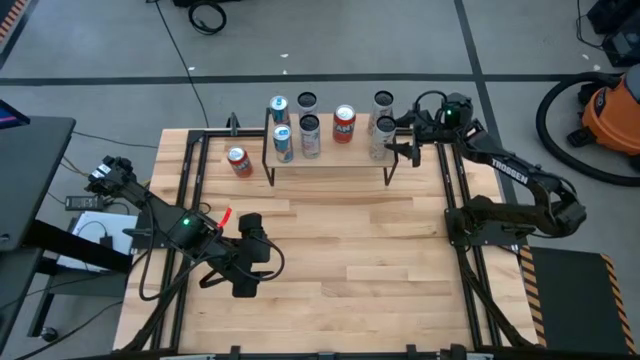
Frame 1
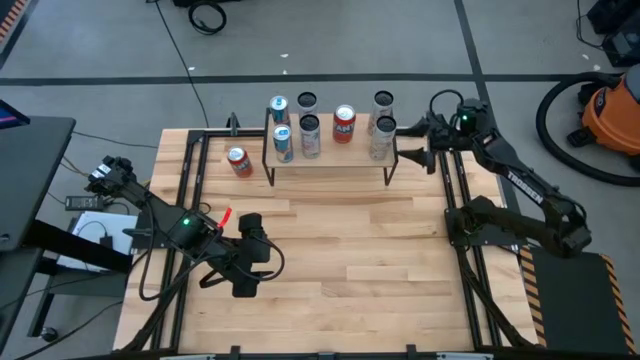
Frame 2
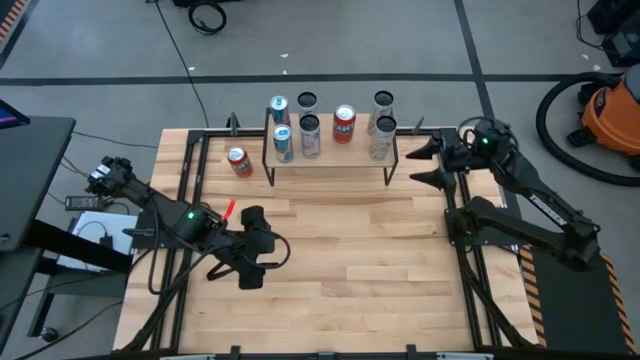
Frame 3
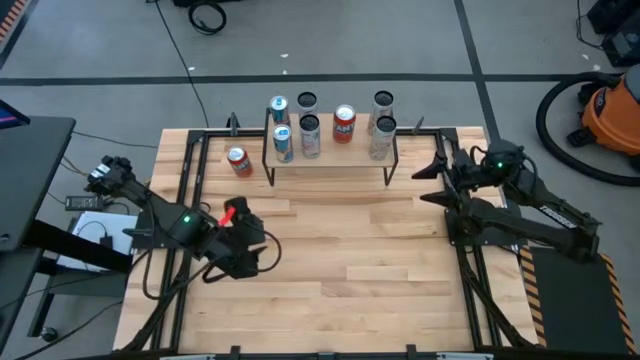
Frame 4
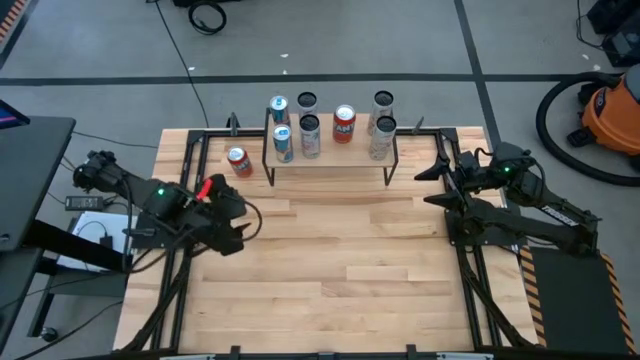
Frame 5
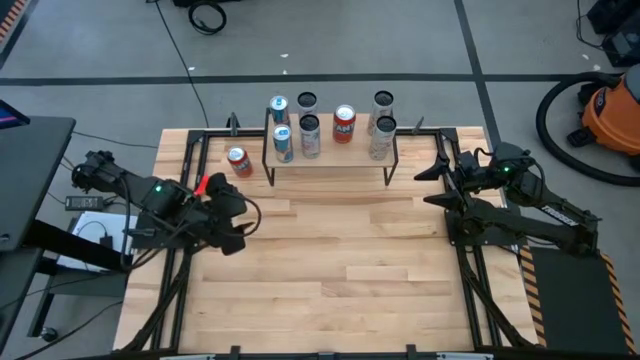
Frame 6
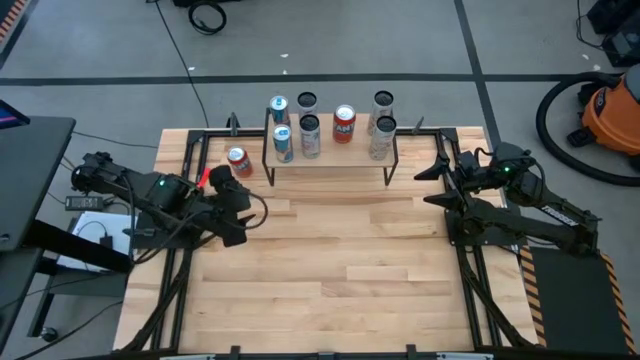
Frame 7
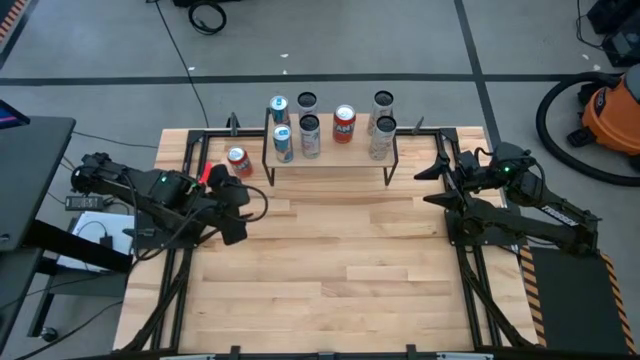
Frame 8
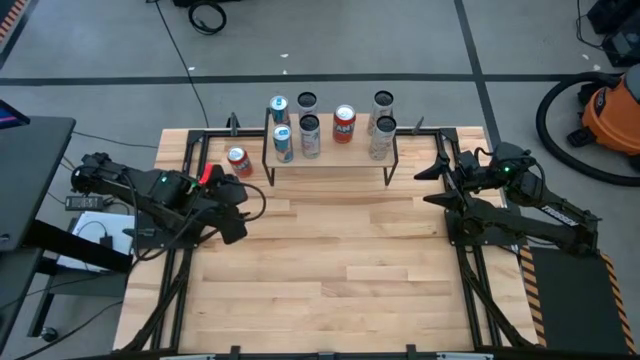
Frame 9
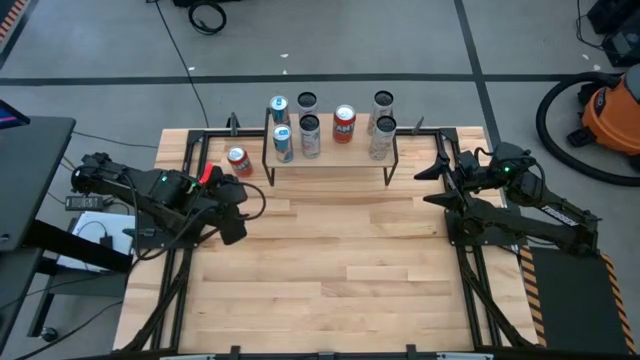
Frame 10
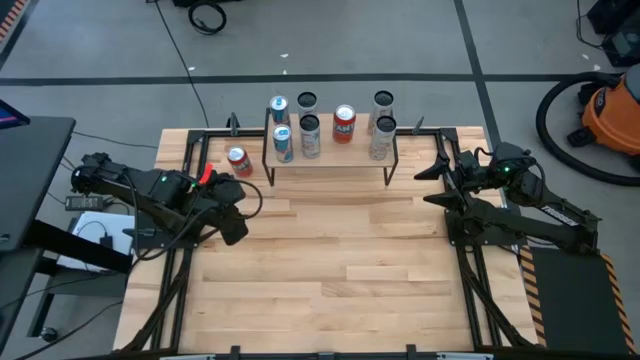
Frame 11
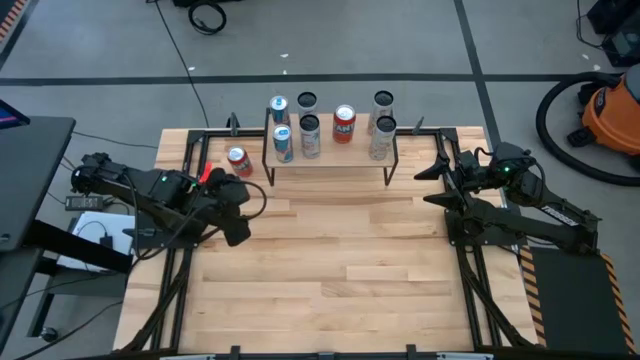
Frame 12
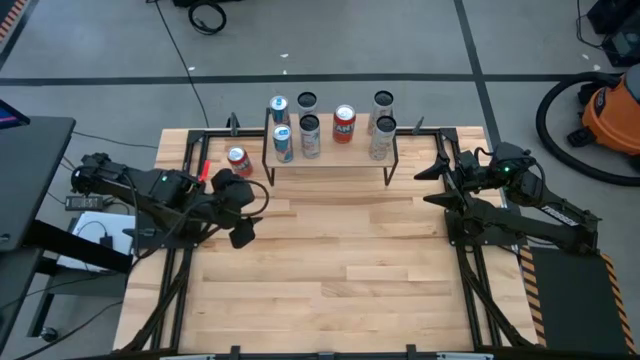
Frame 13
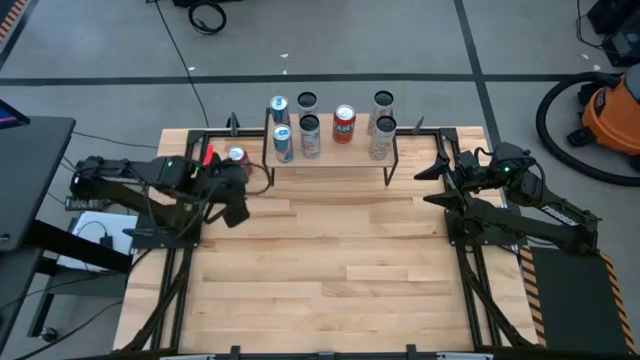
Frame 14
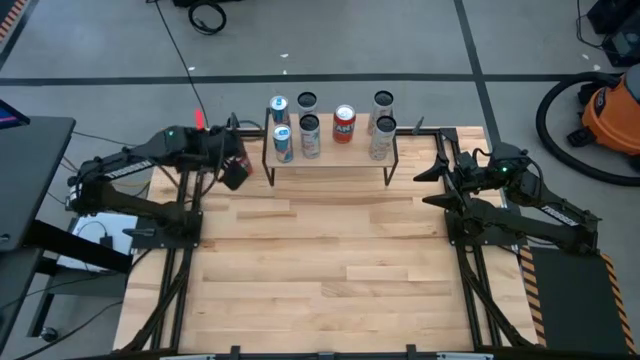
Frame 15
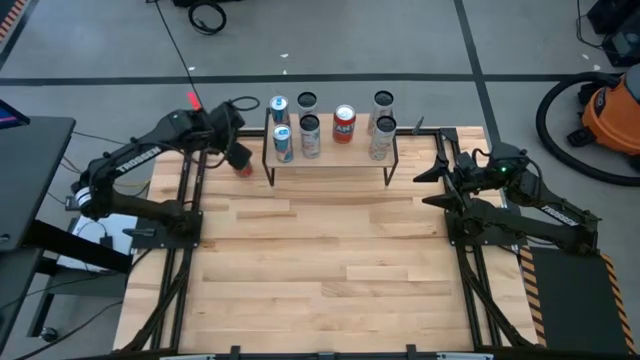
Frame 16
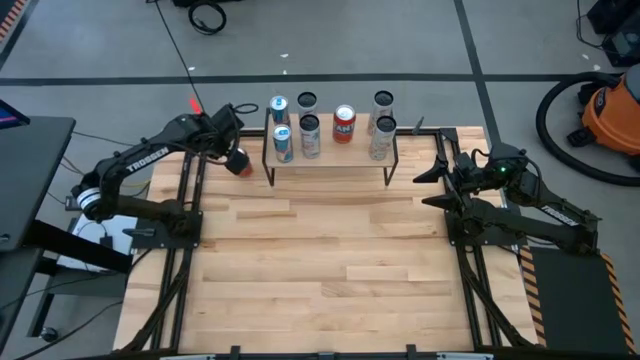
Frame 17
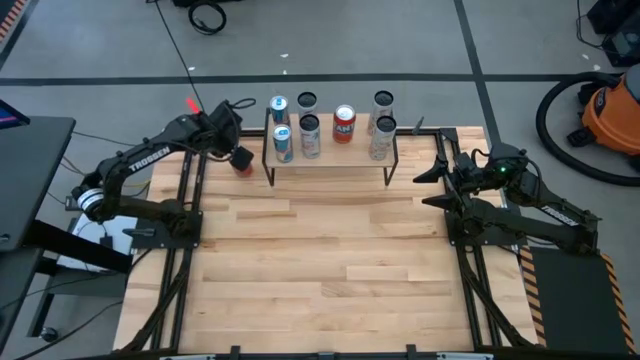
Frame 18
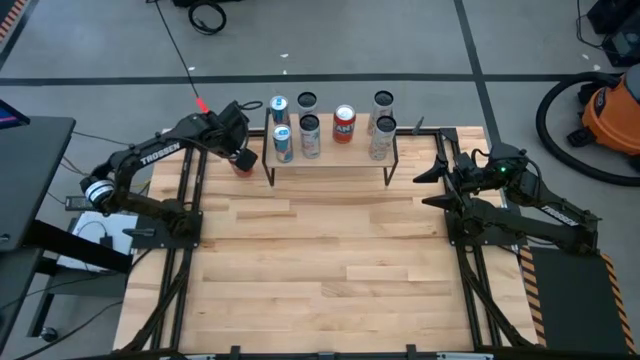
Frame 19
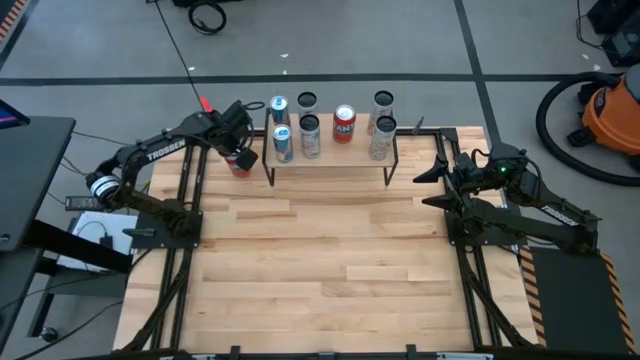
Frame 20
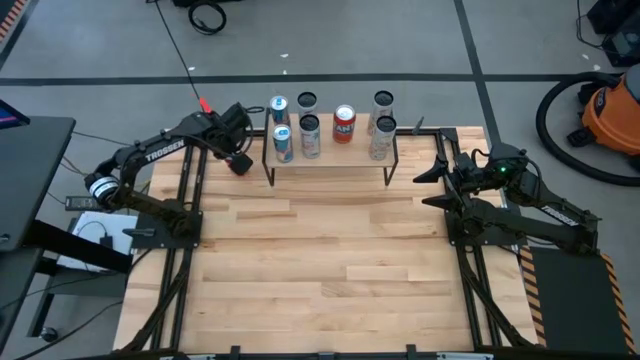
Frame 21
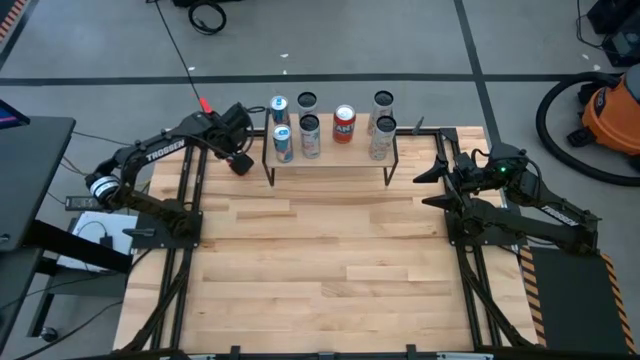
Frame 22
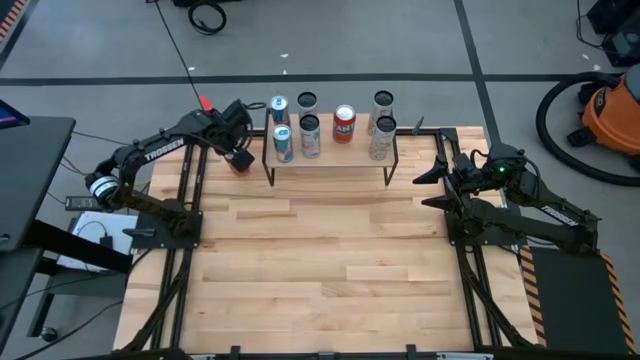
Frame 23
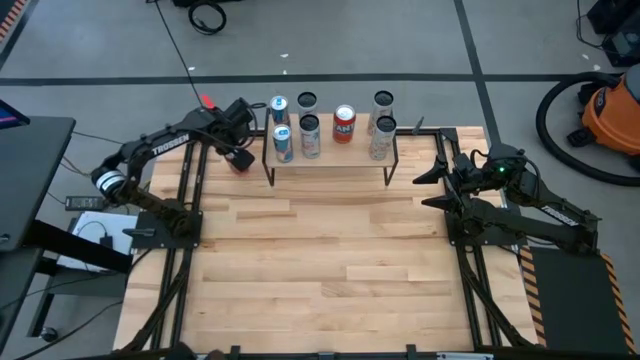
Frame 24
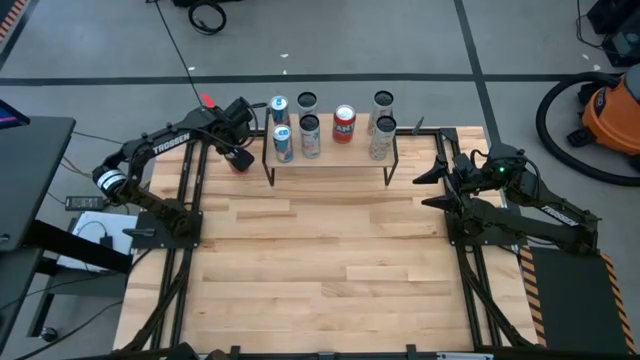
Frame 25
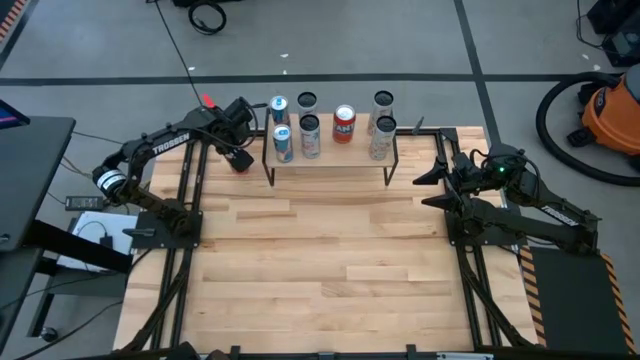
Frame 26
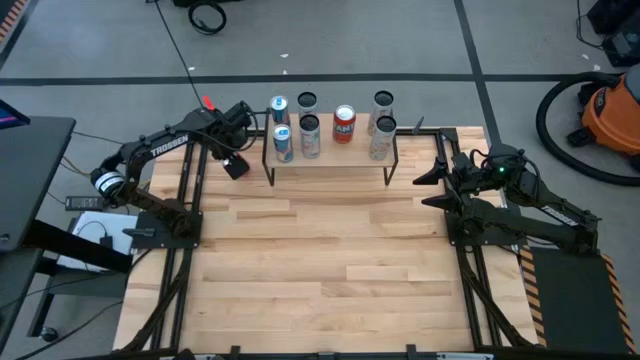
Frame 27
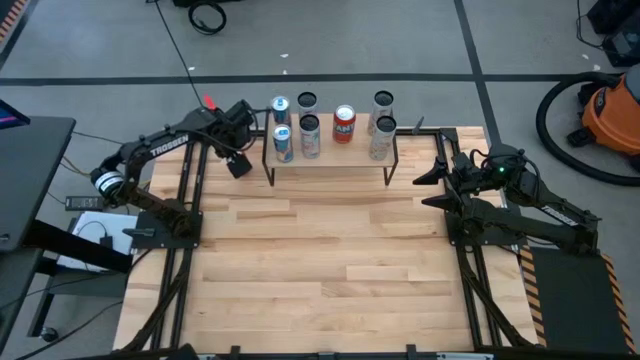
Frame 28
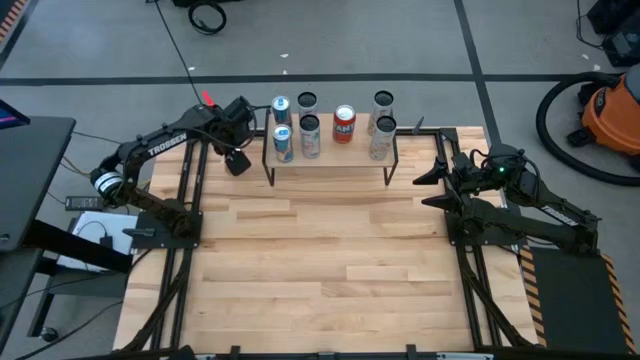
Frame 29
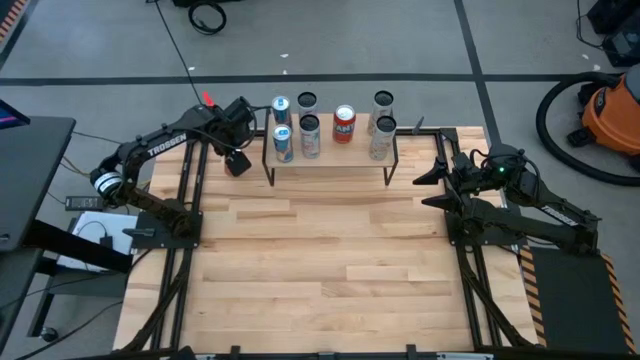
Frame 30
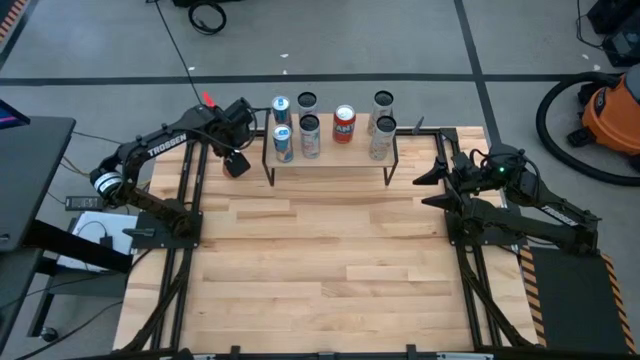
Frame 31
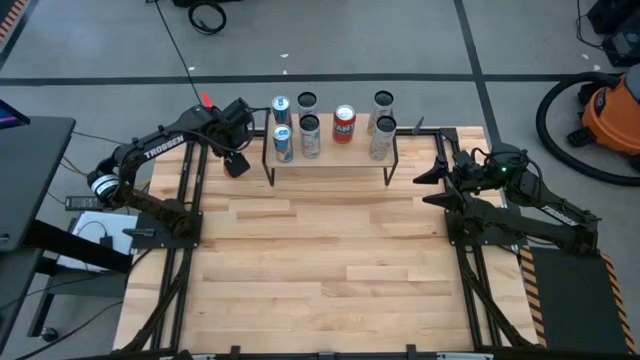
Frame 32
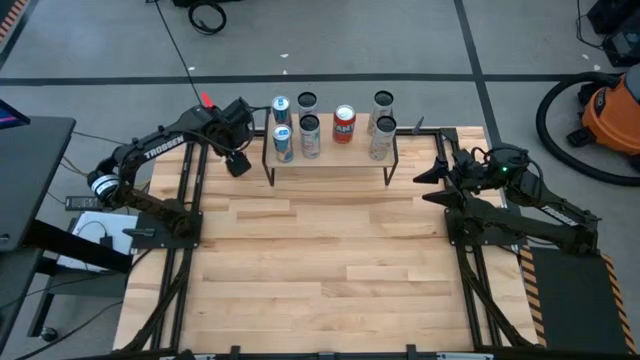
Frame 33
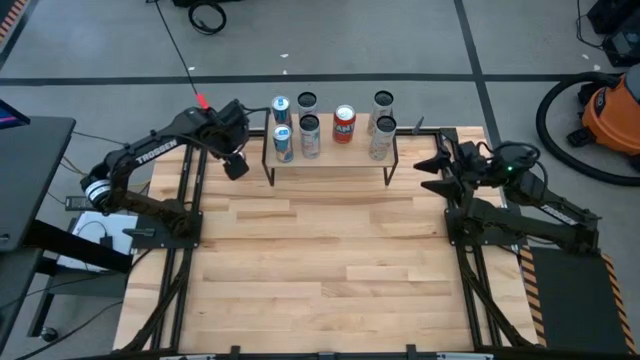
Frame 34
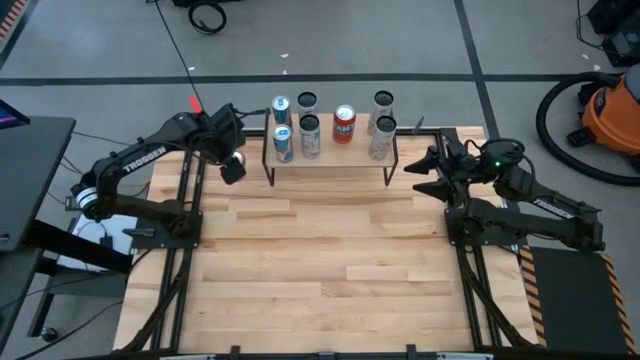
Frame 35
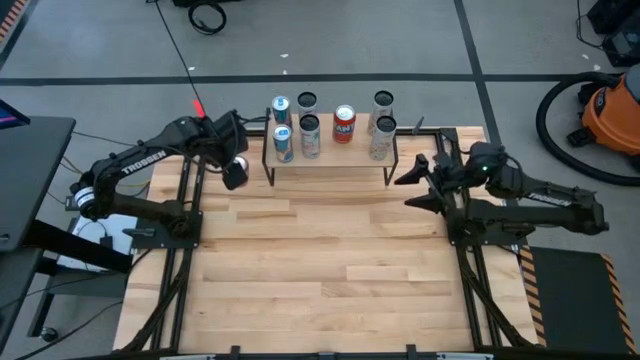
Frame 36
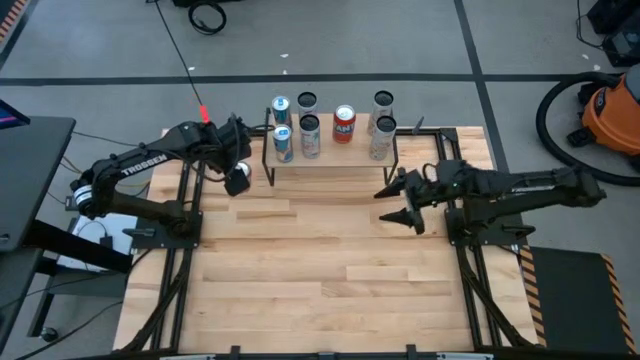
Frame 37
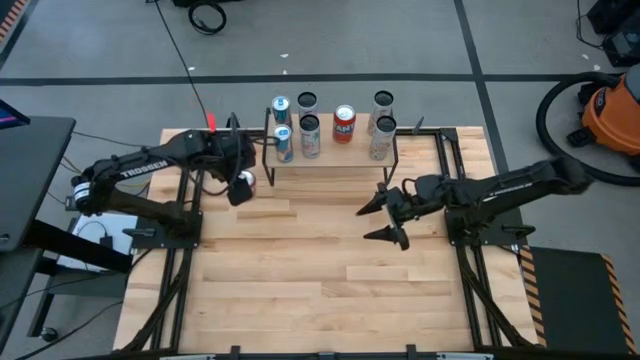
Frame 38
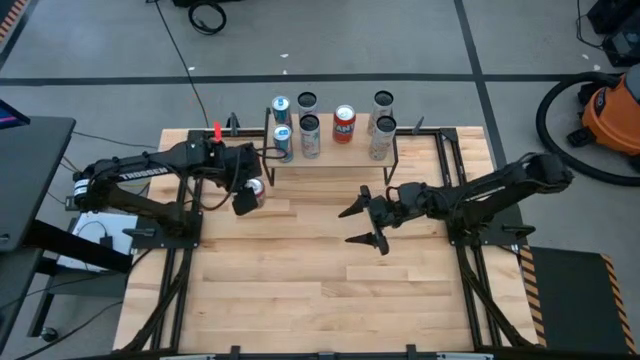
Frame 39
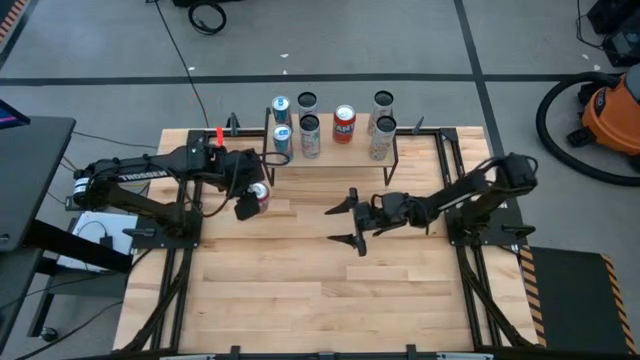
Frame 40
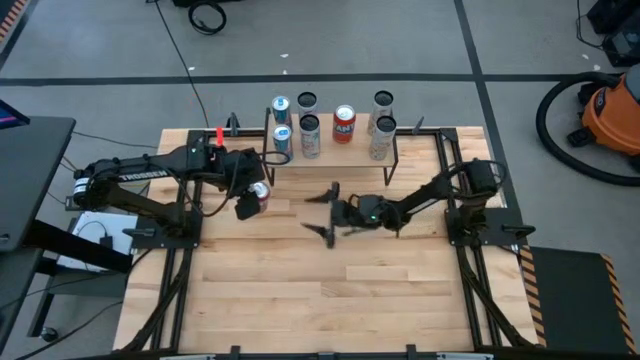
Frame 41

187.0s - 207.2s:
Task: Place canned beverage on shelf
Put the orange soda can on the shelf
